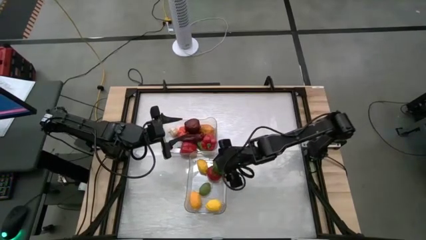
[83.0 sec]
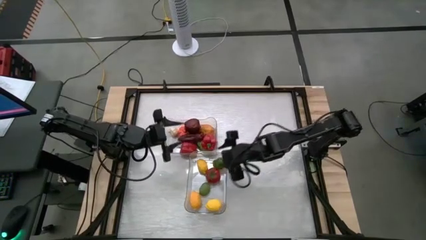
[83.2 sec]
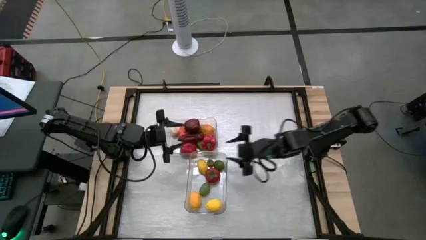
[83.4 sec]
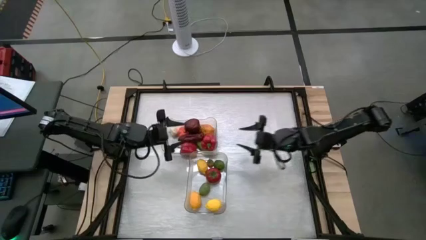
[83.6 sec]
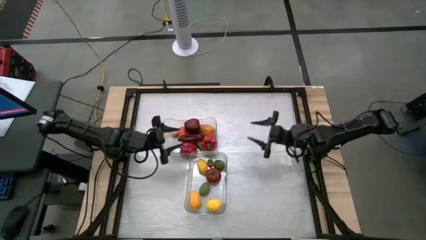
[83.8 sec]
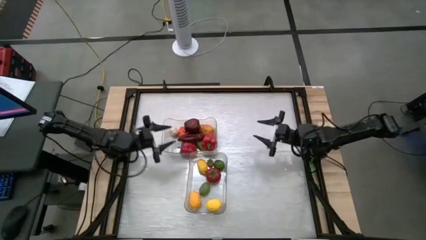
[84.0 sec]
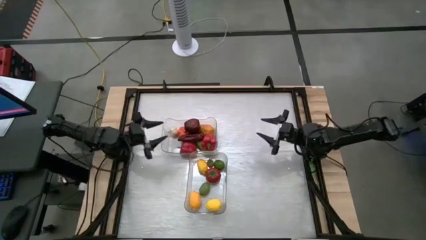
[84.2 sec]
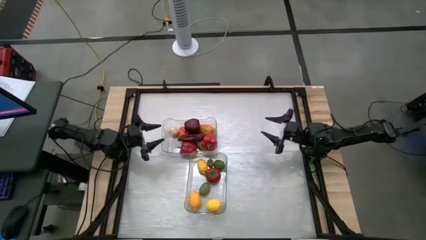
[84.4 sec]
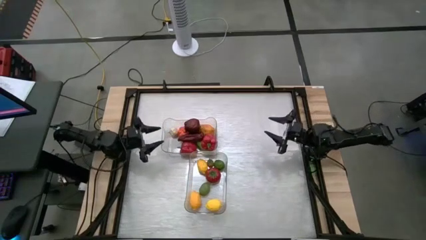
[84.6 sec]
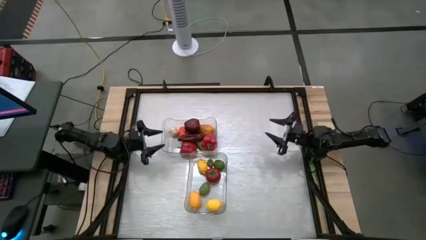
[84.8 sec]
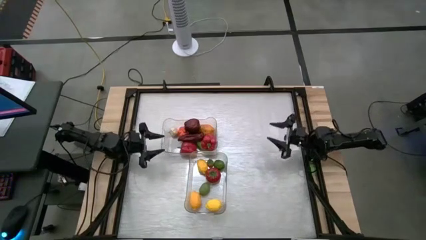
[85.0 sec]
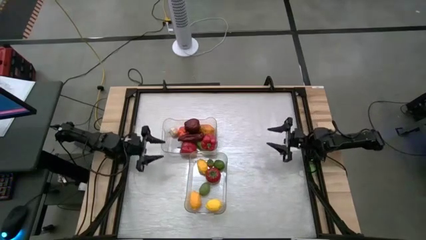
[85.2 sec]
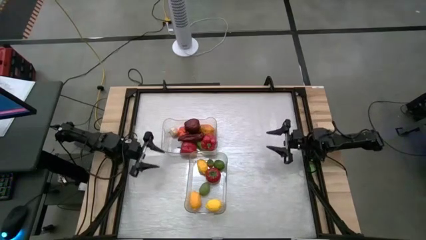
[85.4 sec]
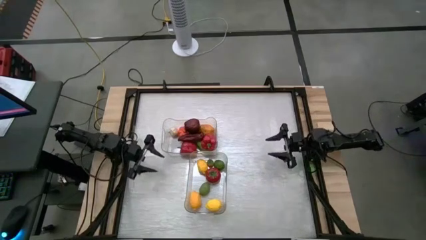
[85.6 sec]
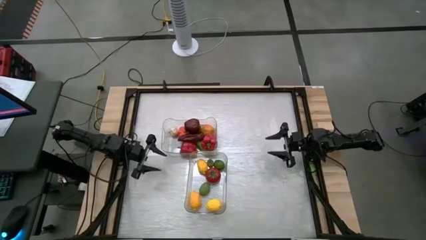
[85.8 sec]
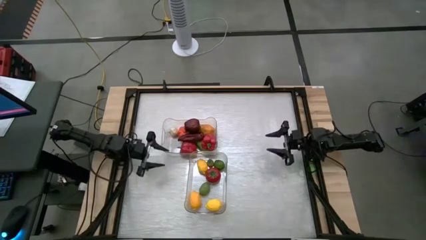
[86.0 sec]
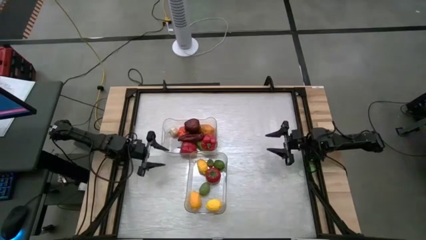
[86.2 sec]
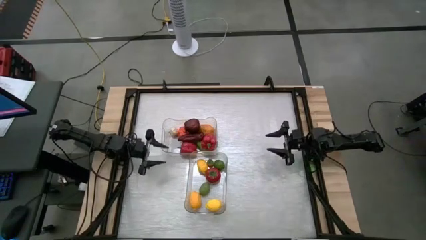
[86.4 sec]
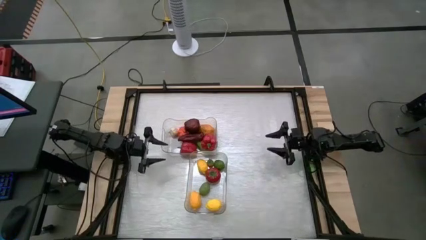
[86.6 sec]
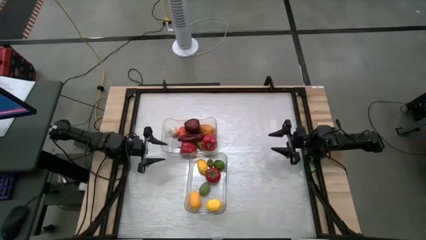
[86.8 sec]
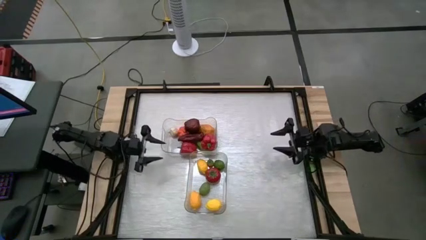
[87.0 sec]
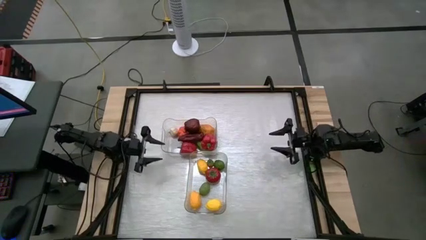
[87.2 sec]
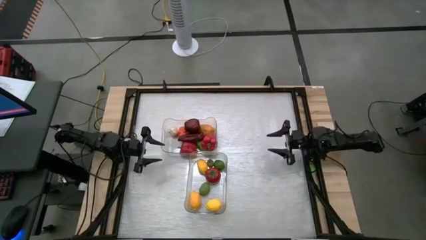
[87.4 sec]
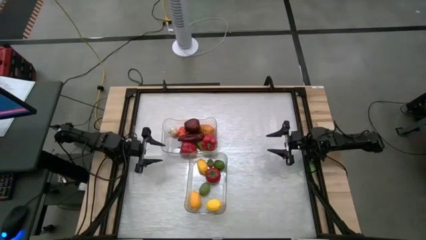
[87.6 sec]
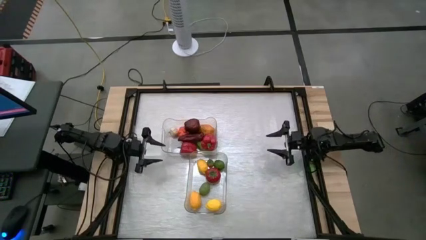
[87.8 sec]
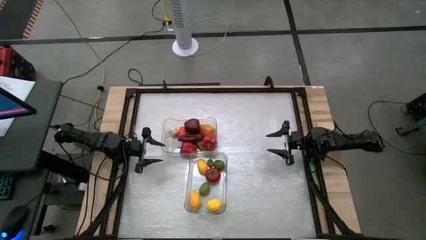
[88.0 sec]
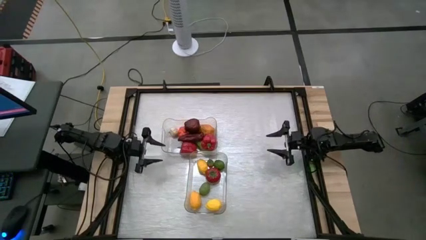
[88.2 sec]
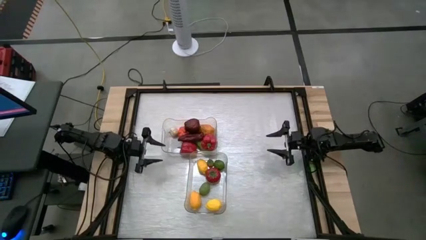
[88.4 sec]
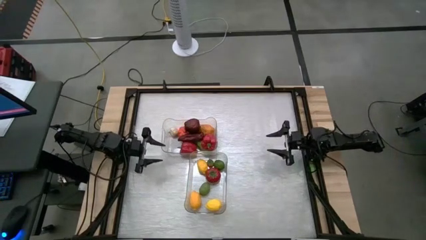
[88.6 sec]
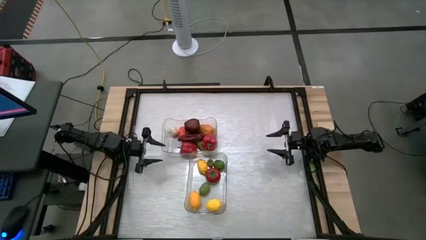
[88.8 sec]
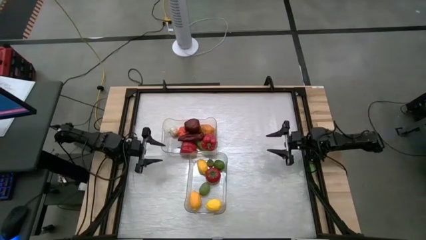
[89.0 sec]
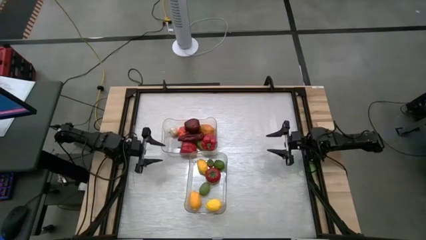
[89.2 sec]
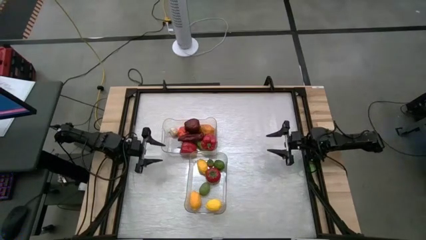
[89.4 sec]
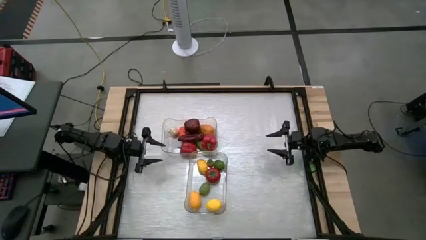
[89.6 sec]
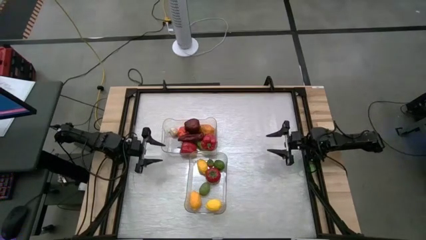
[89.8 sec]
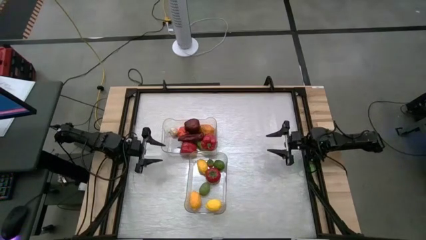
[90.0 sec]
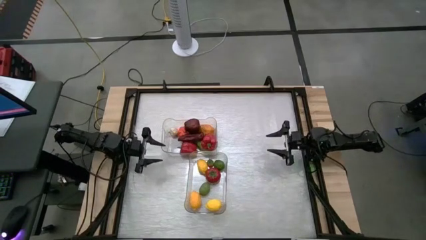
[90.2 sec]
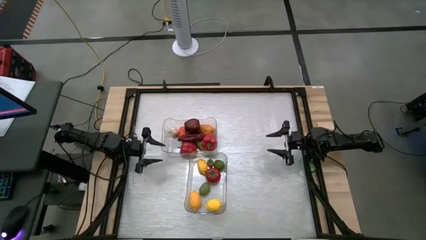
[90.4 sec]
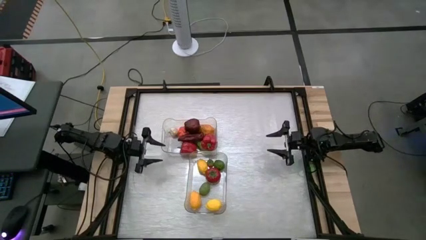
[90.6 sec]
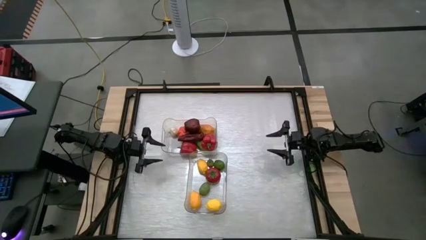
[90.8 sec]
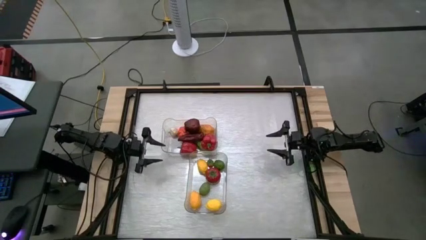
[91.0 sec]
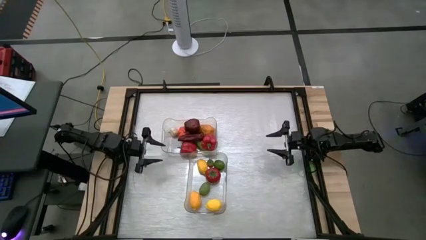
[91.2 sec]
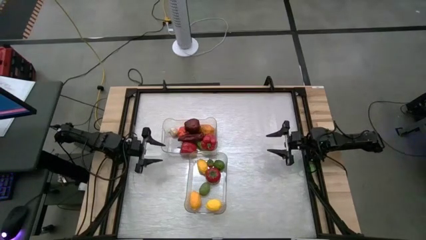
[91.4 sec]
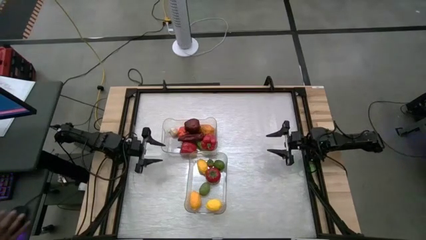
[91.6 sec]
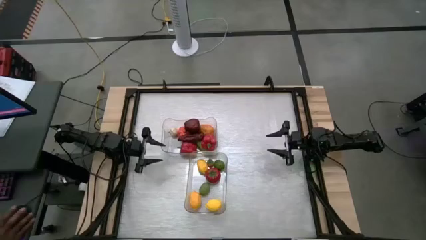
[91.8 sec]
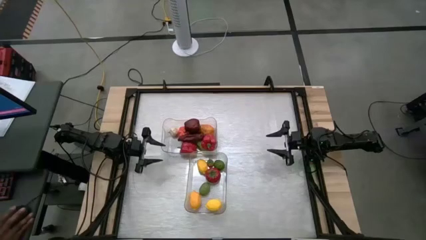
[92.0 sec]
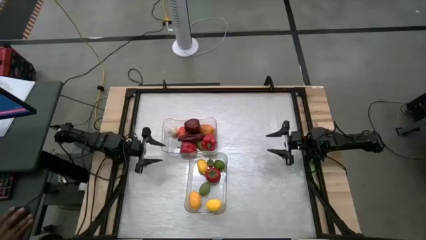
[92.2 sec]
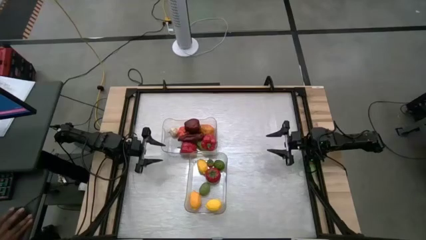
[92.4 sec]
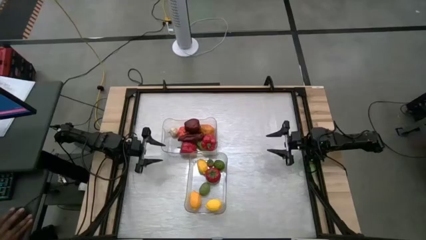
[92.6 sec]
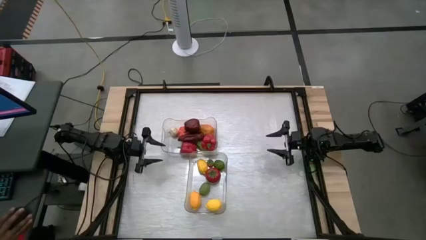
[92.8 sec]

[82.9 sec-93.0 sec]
Task: Sort produce into baskets
Return to Home Position

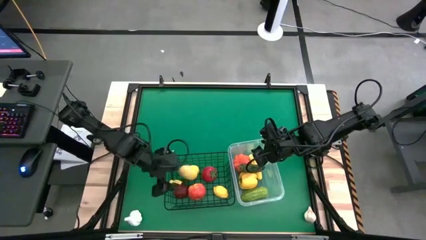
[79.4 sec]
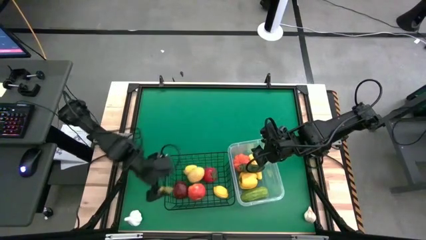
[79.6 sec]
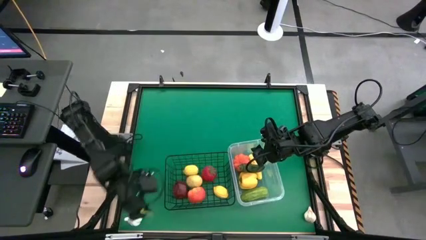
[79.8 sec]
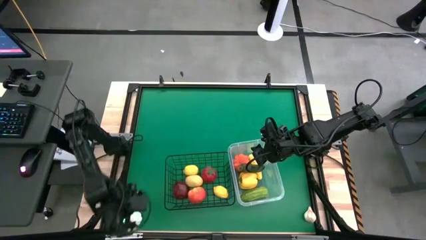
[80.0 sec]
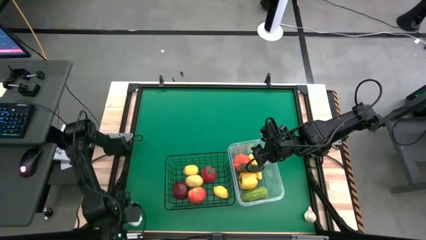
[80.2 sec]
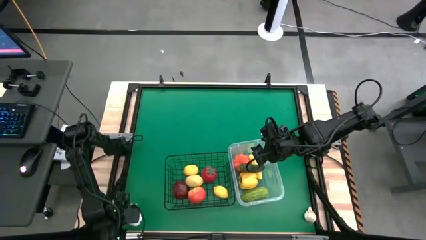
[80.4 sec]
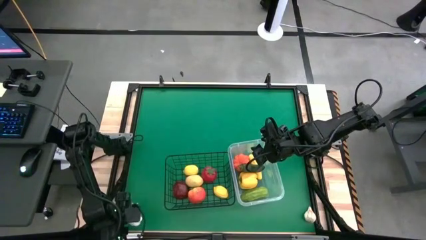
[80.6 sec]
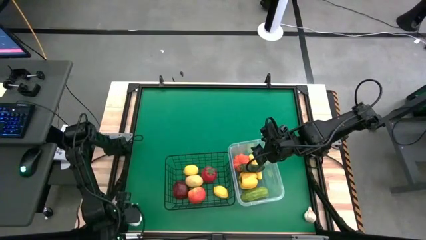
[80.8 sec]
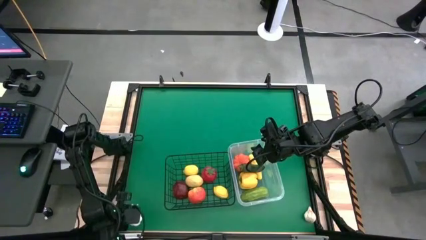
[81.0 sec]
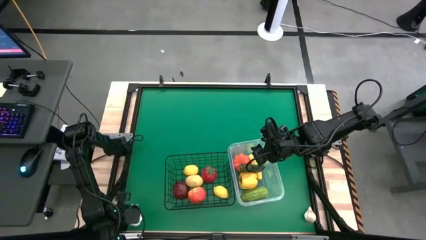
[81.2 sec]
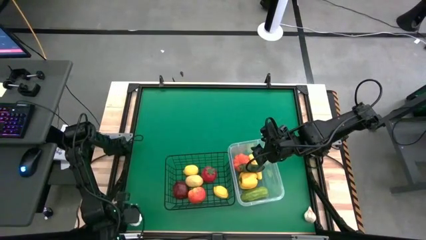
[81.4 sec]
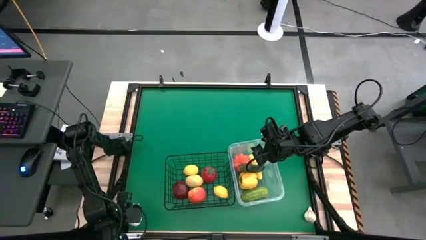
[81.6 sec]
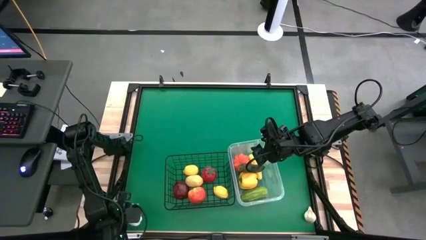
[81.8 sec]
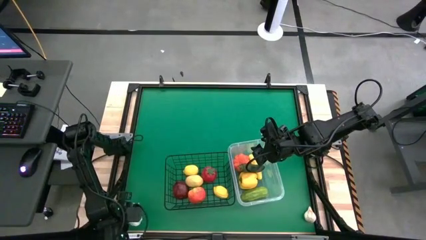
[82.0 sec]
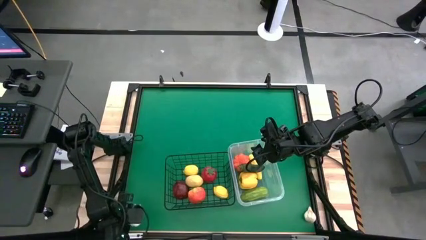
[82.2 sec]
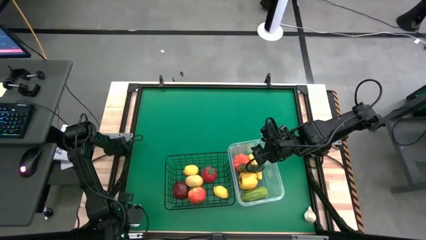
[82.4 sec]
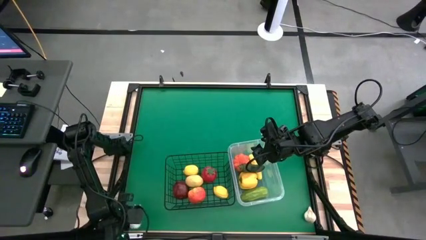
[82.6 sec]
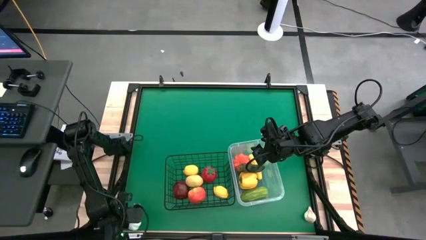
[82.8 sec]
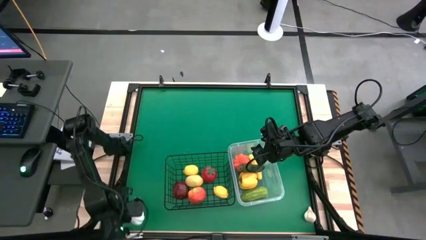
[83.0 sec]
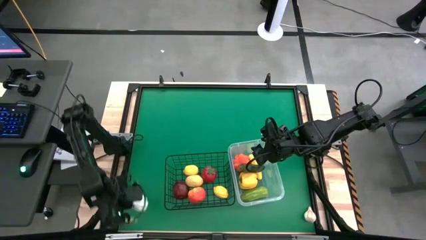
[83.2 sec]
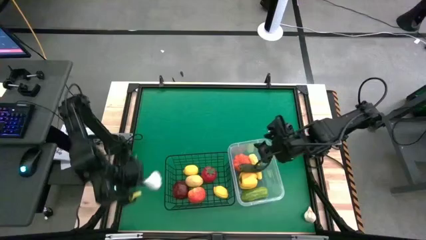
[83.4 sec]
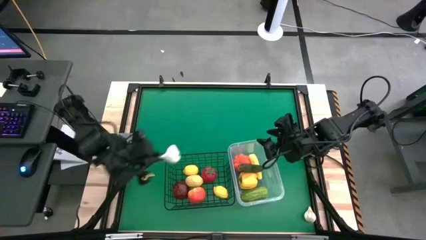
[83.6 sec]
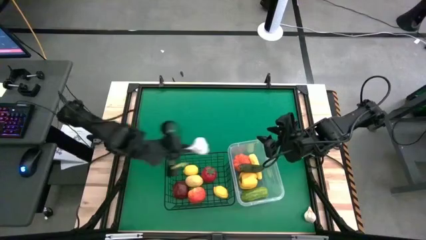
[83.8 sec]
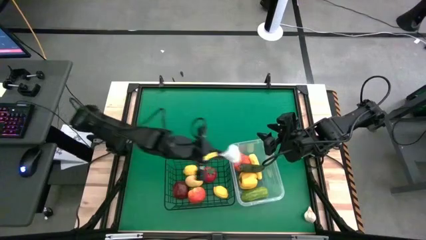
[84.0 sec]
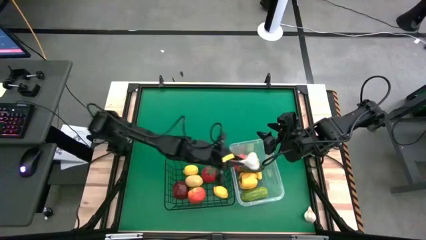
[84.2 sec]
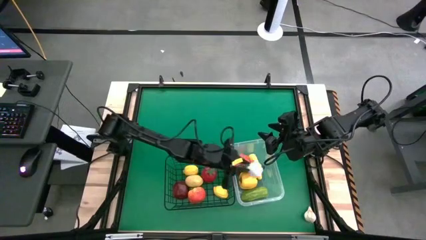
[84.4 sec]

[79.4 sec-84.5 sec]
Task: Sort produce into baskets
Put the bottom left garlic into the transparent bin

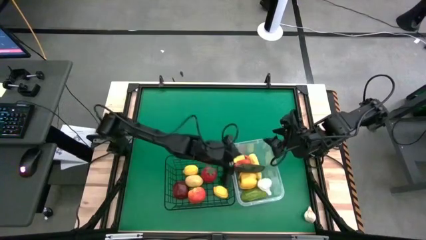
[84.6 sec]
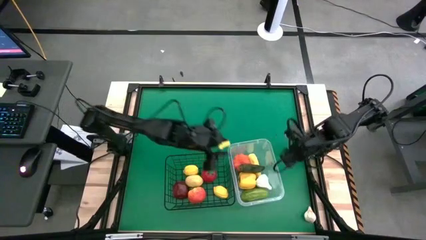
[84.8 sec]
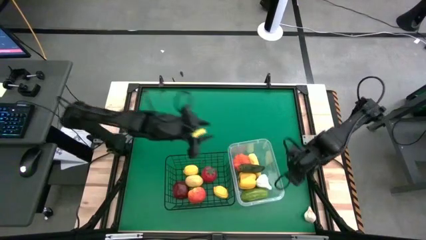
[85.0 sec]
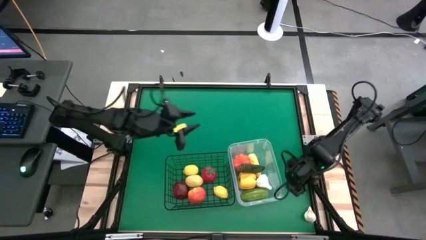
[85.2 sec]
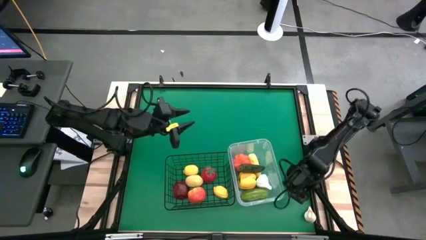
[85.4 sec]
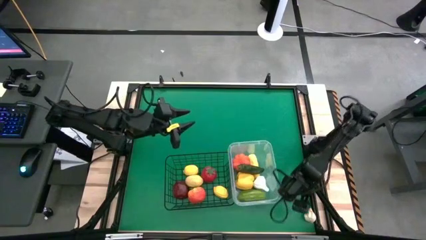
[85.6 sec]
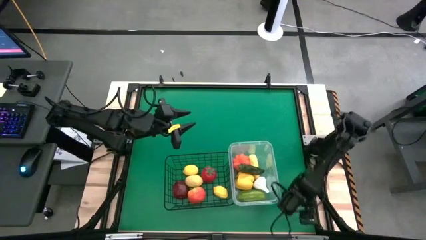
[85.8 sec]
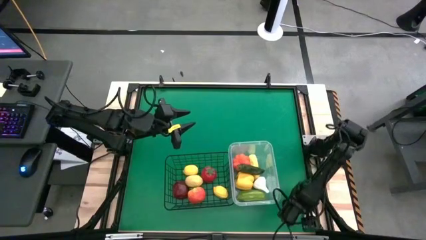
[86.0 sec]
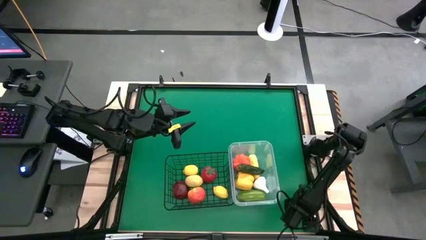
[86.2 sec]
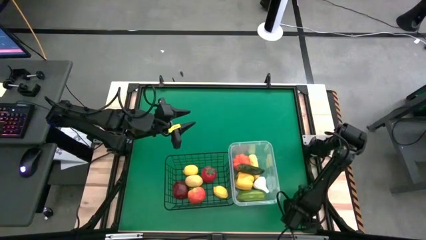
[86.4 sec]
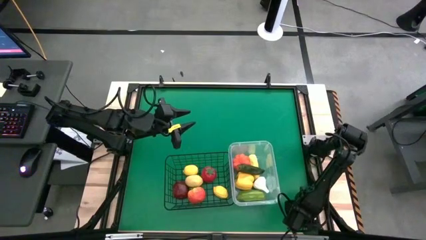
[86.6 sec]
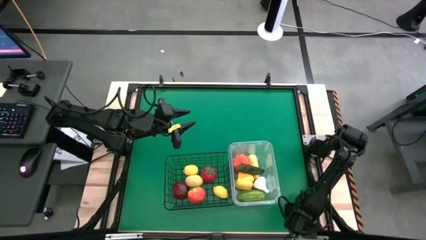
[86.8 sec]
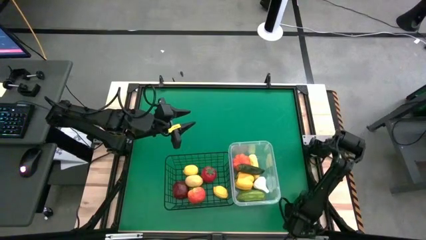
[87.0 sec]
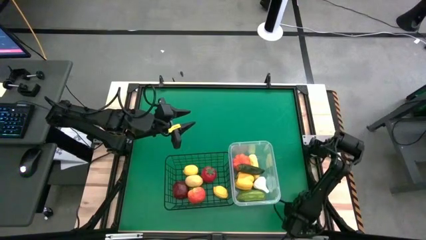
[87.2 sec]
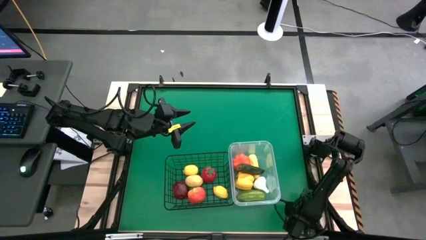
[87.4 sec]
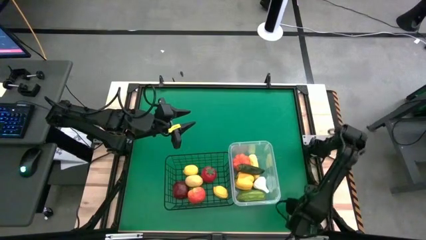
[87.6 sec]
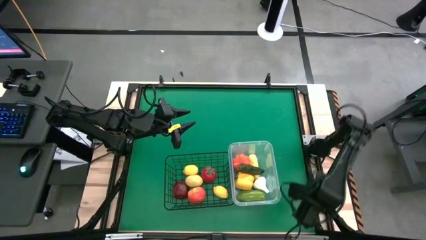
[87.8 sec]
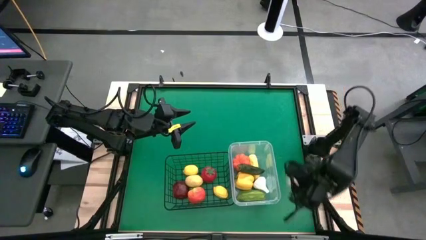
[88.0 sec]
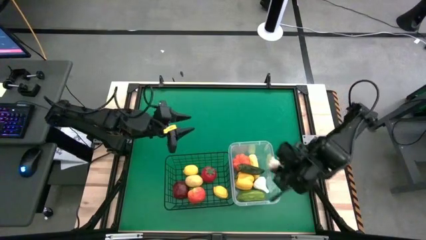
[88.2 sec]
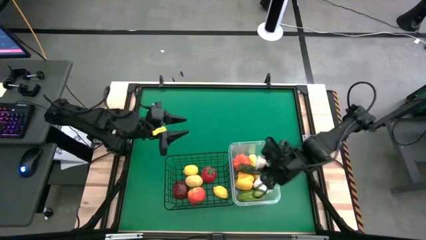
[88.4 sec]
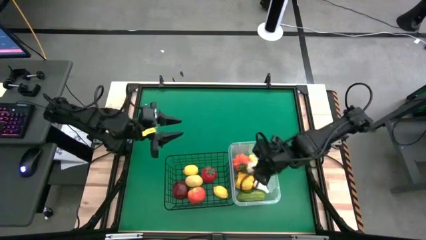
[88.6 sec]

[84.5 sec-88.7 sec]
Put the garlic into the transparent bin
